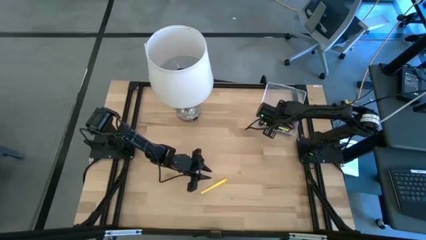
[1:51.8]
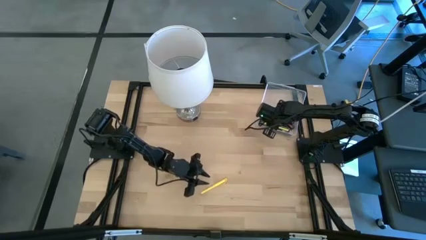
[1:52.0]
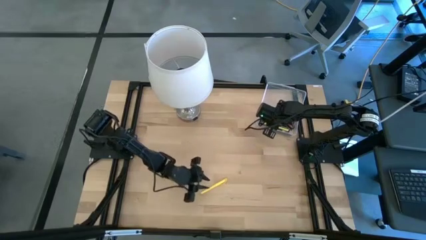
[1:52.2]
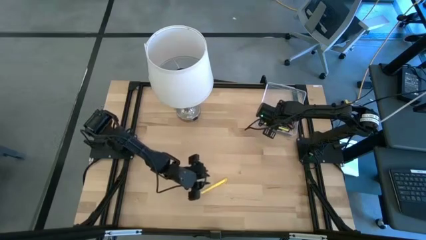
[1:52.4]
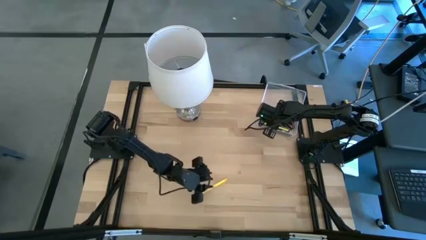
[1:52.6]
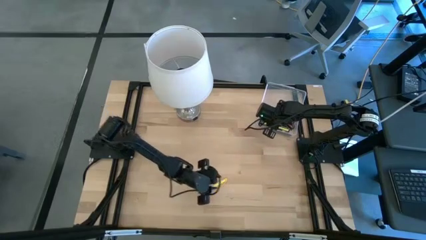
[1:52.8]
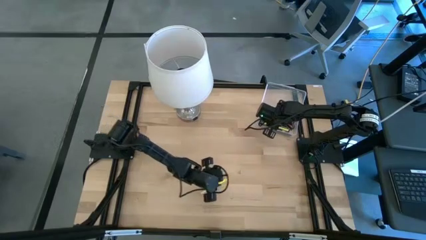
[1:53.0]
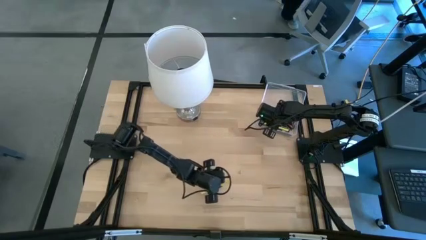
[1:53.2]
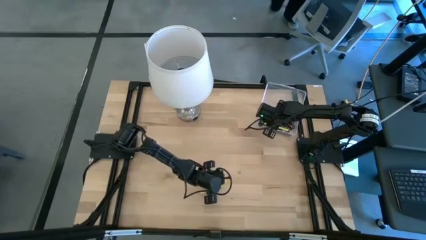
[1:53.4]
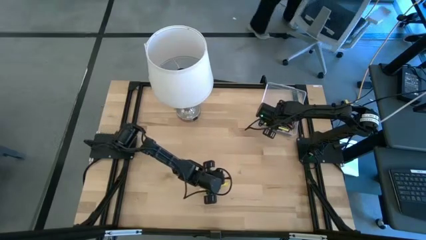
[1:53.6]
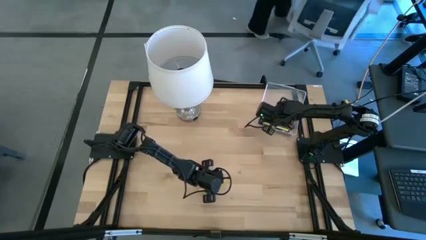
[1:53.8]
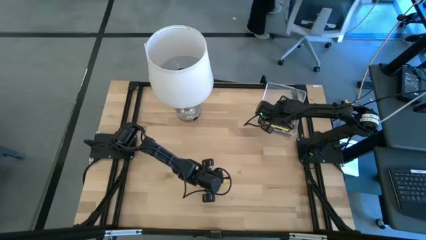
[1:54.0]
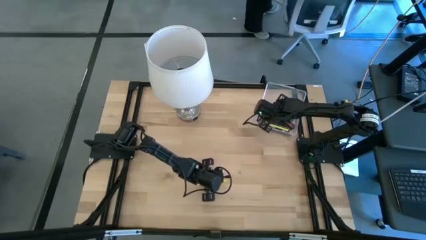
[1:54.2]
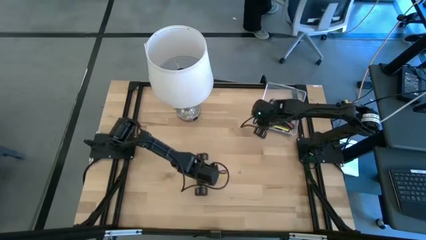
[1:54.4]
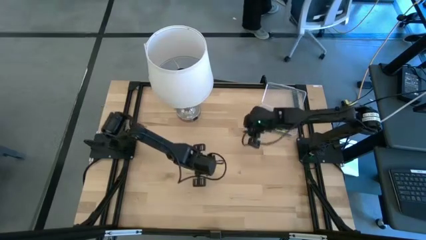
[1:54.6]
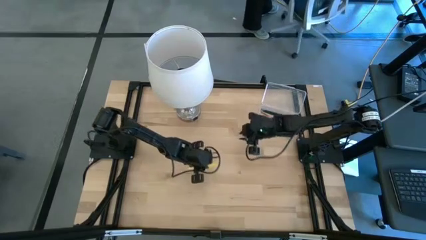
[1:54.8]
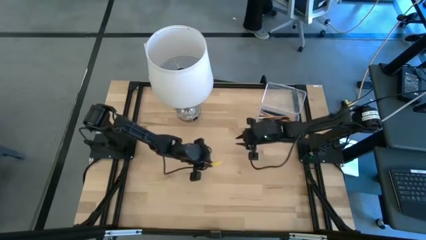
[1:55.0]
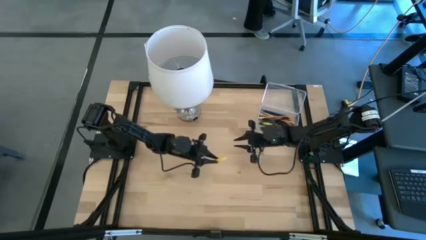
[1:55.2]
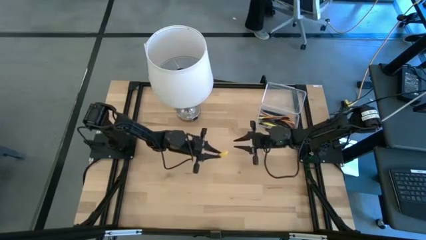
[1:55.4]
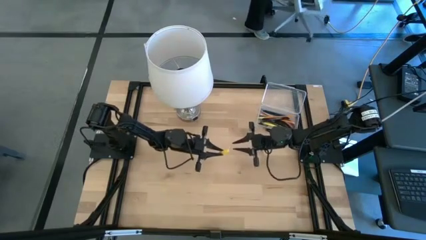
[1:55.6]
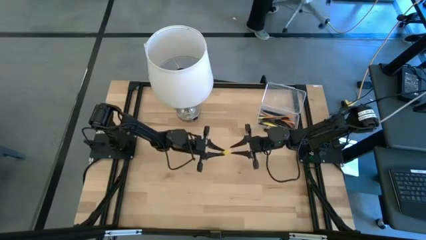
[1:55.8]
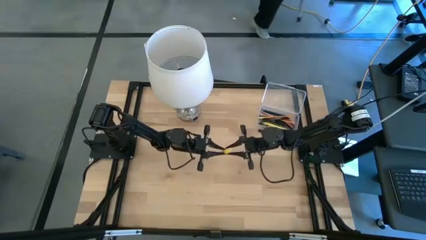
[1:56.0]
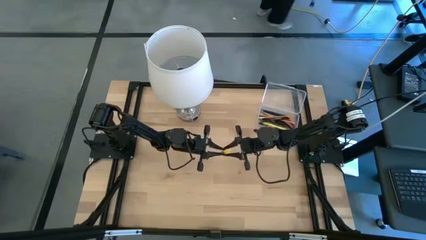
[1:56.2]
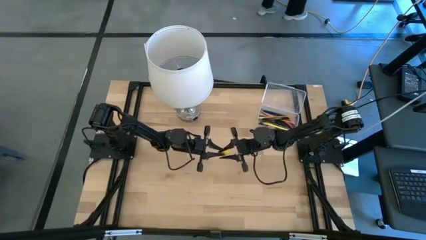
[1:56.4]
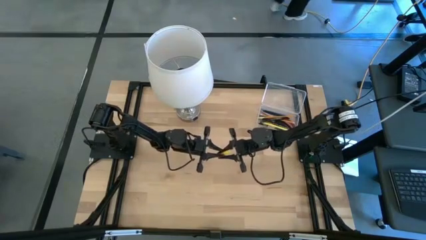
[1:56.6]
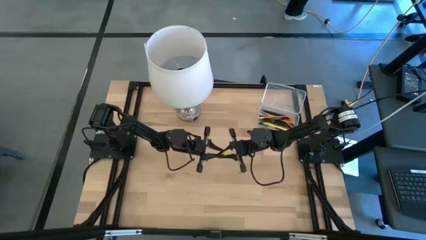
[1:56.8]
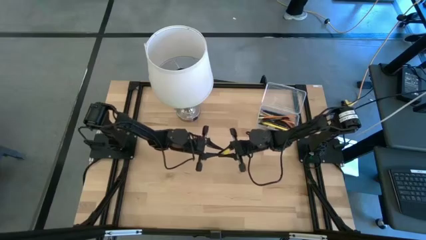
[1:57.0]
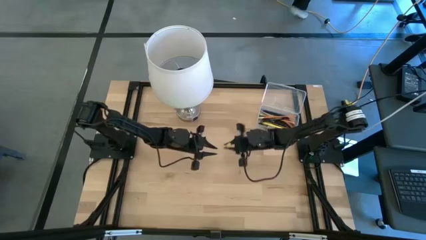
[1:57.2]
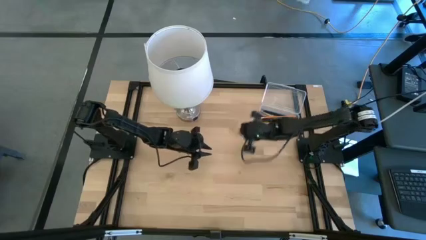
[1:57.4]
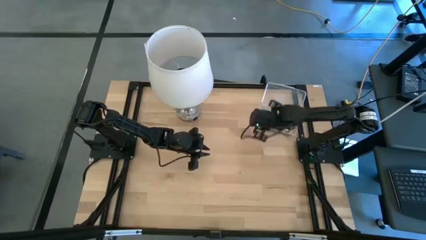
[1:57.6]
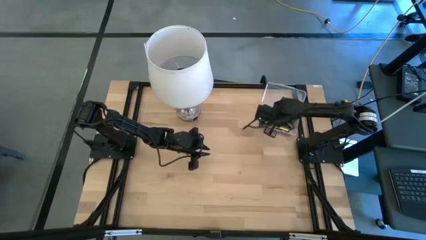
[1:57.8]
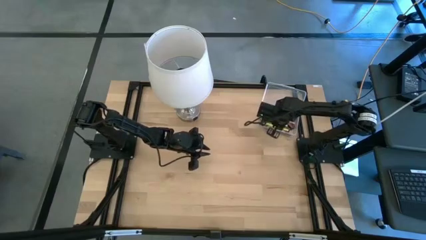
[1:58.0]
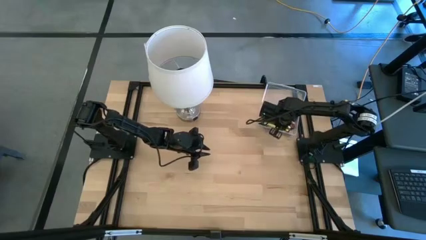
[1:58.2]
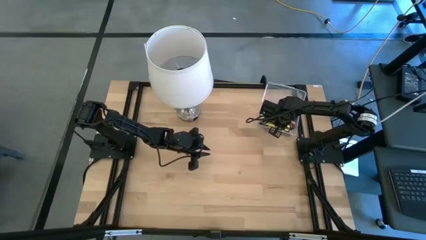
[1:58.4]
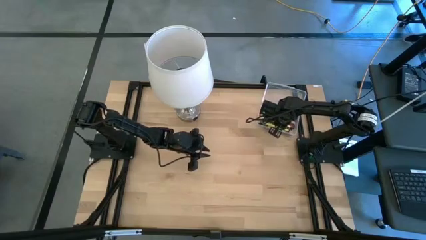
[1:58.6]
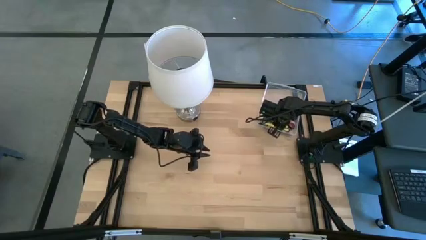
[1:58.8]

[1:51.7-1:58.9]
Task: Pick & place school supplies into a supply box
Put the yellow pen into the transparent supply box

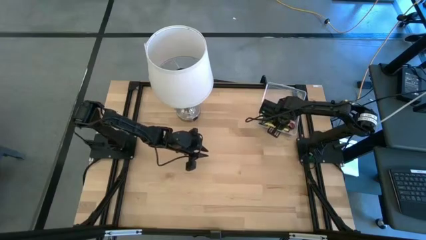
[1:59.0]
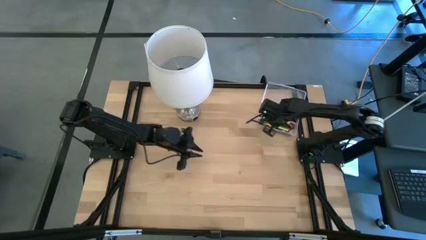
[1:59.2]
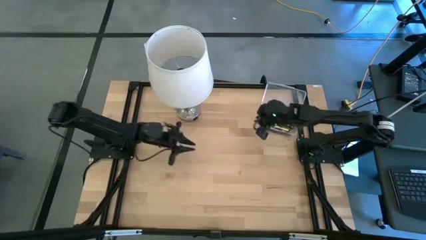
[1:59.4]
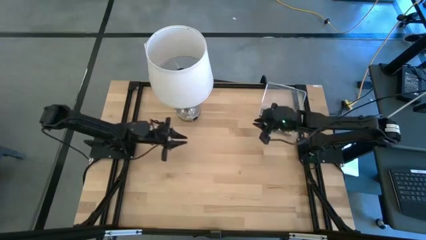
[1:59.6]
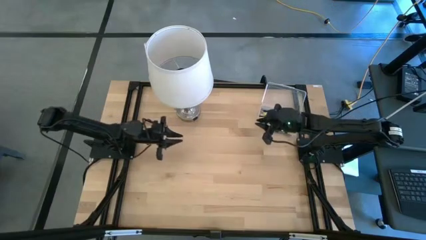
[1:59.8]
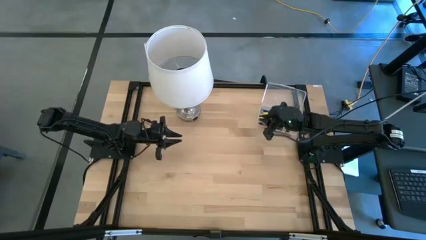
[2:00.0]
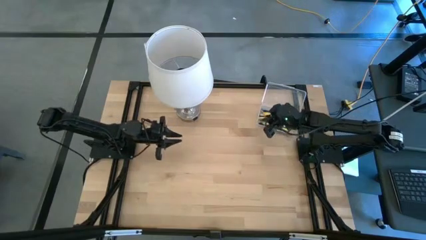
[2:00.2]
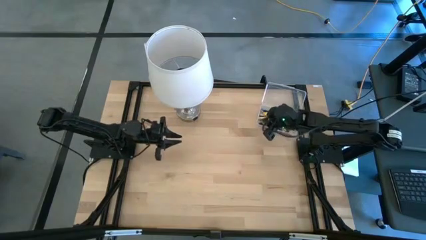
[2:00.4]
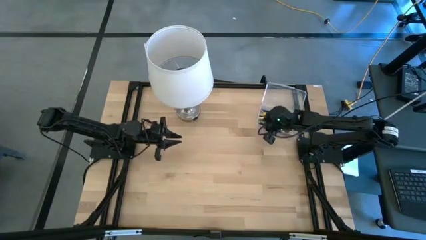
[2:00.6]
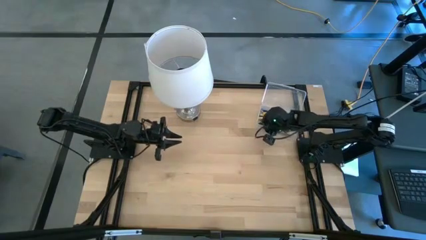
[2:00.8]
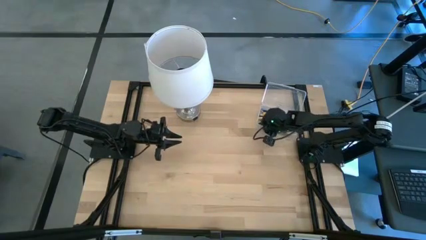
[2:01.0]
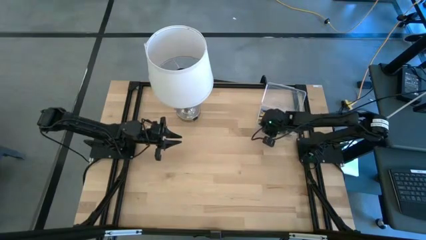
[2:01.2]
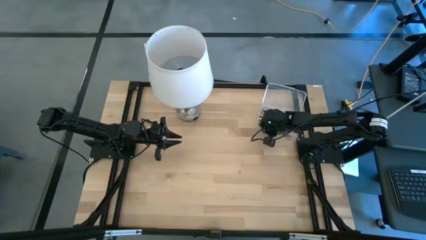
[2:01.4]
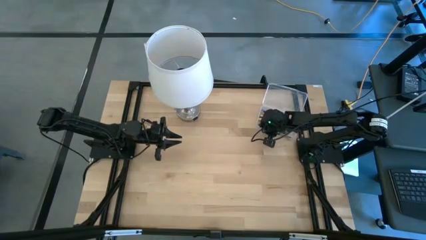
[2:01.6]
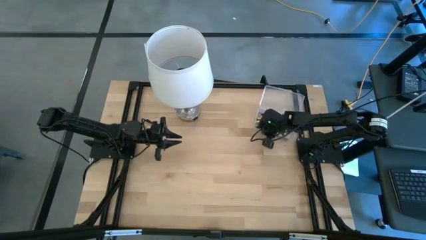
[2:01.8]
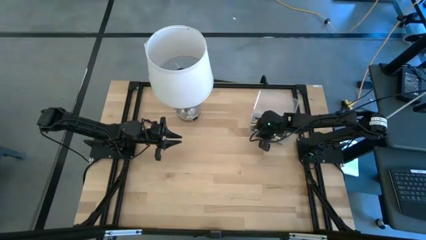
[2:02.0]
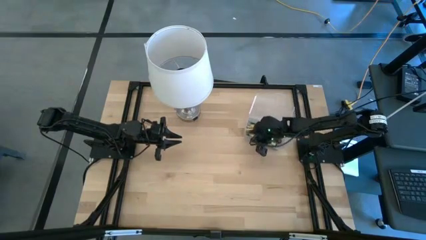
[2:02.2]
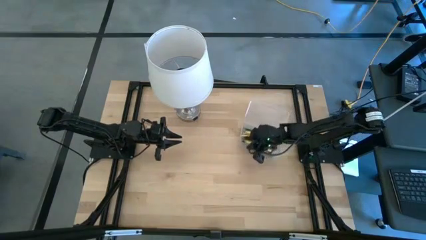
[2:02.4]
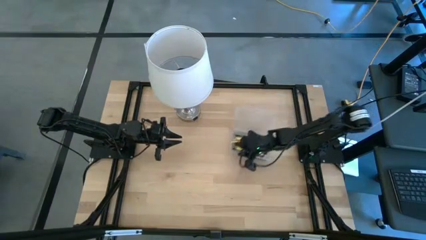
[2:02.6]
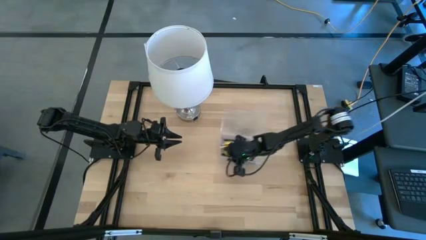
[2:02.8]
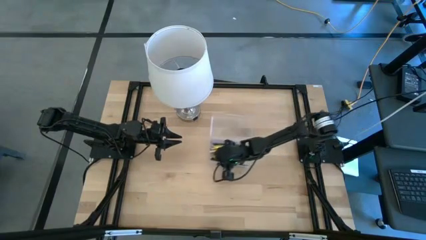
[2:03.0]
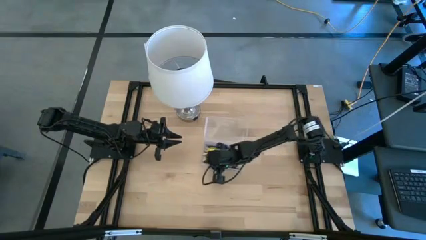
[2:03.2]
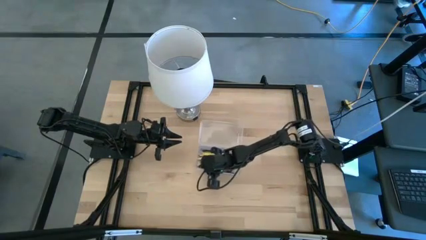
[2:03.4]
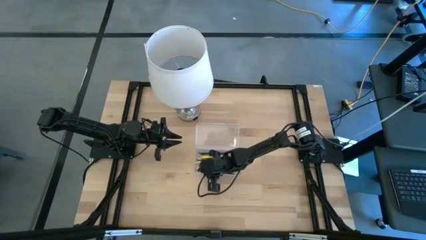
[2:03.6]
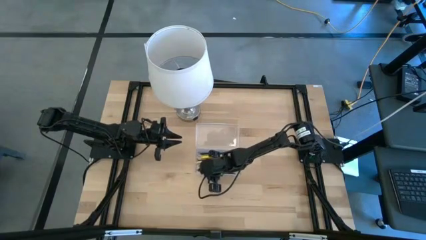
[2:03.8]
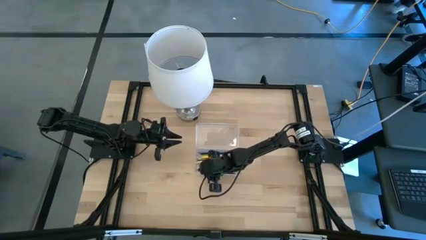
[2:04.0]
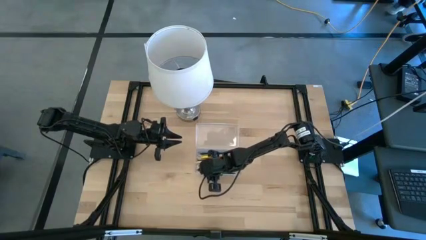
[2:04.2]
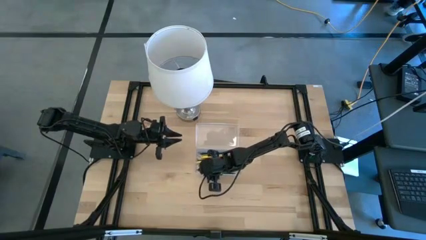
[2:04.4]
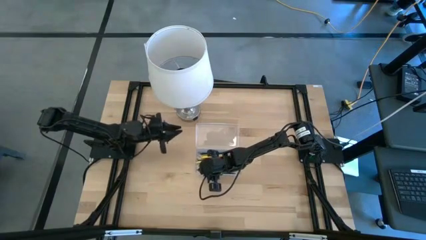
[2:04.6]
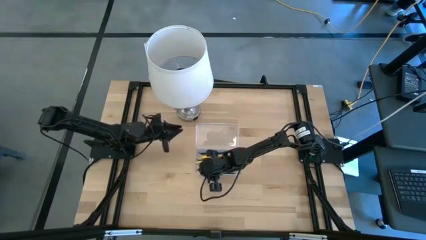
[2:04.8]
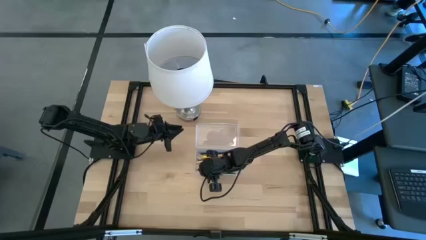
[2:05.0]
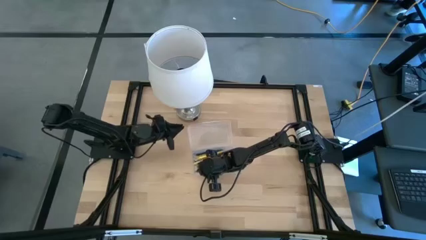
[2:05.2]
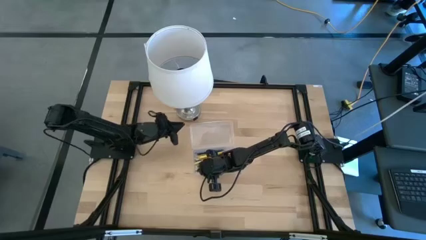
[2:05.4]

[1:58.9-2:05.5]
Move the transparent supply box to the center of the table

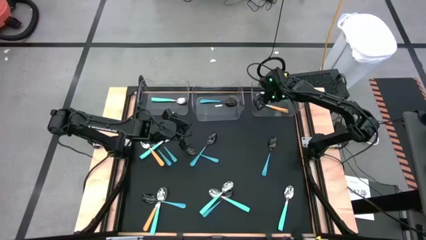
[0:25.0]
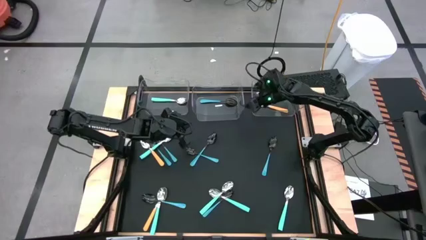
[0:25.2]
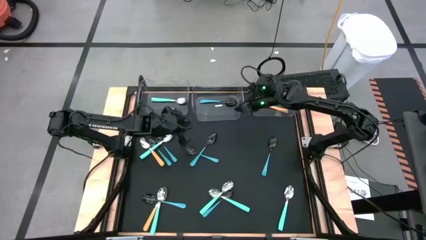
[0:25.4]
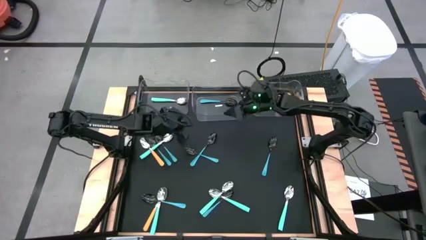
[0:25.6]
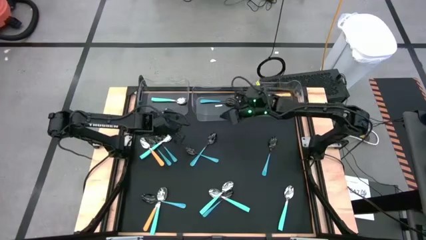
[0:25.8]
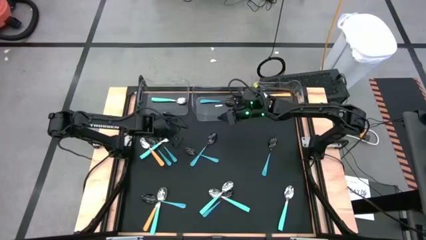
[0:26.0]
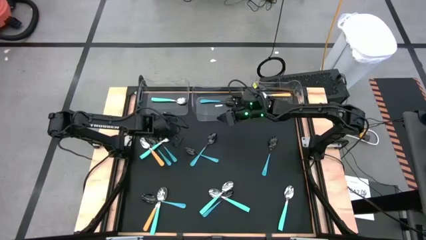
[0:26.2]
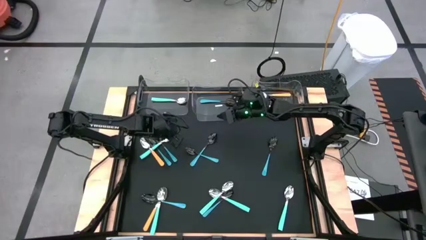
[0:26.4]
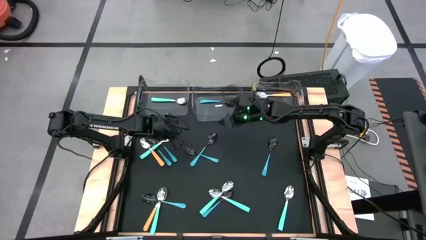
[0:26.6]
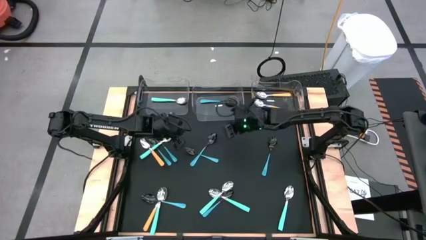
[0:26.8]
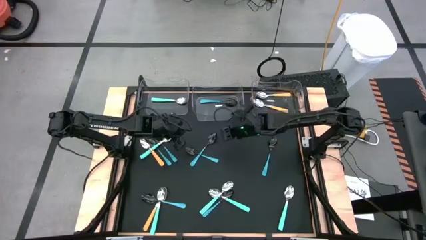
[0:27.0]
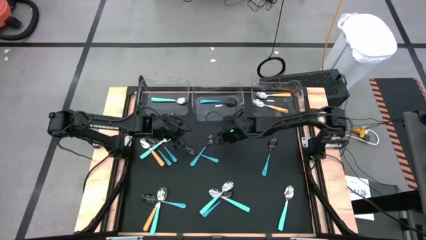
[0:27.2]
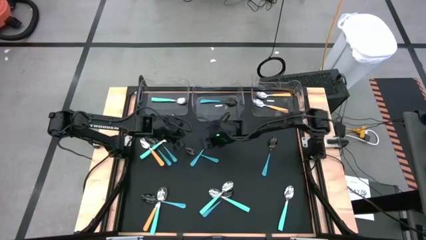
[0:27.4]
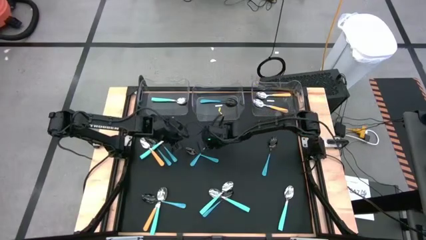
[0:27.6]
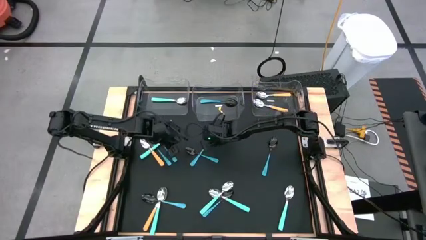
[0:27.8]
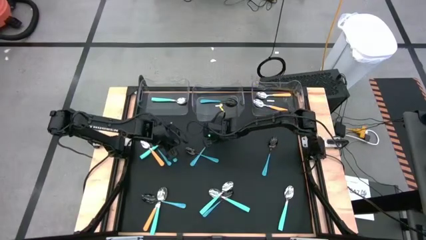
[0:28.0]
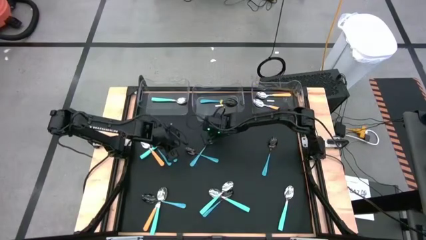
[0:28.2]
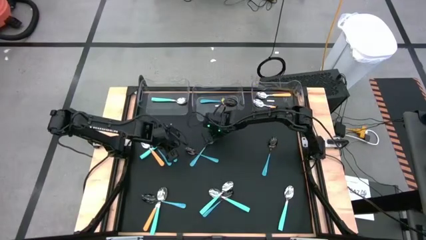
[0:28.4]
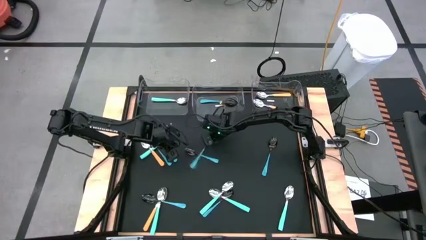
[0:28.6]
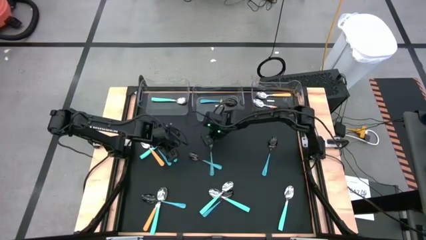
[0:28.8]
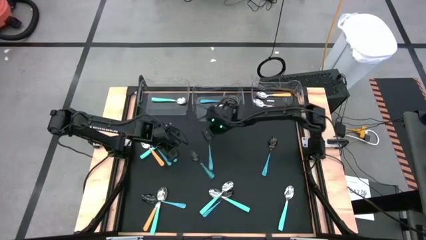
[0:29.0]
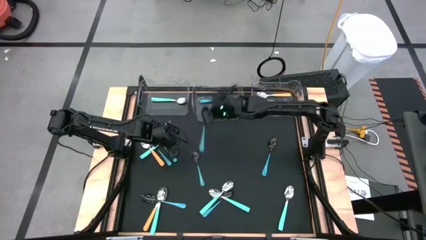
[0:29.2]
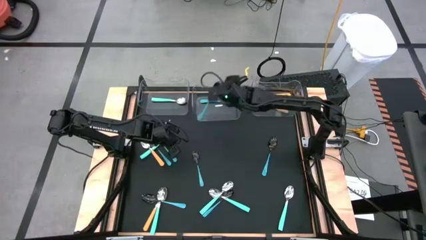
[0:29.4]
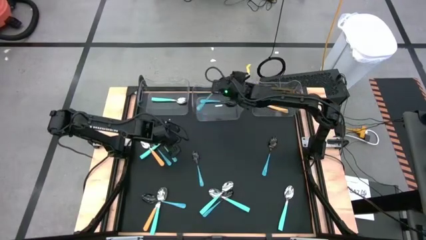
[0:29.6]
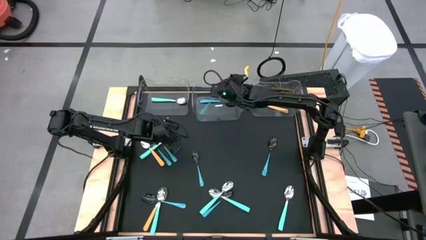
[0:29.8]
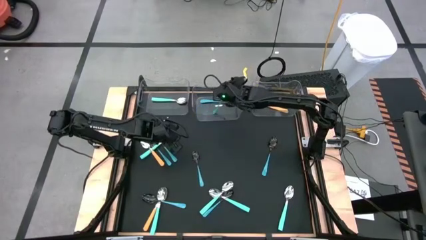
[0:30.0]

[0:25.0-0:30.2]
Task: Sort silverware by color (type)
Put the blue spoon into the middle transparent bin
